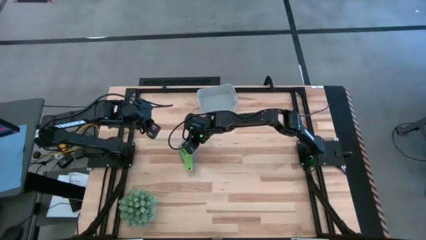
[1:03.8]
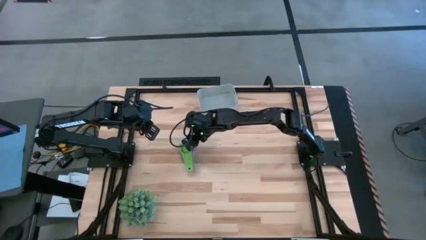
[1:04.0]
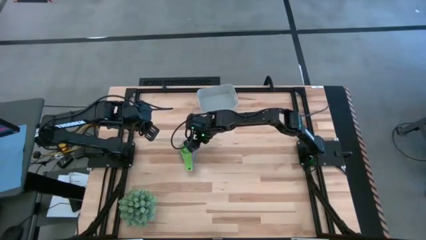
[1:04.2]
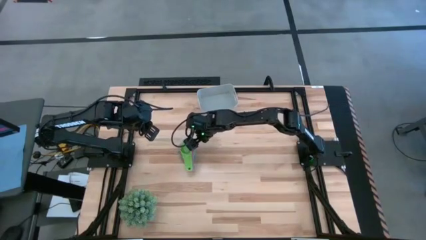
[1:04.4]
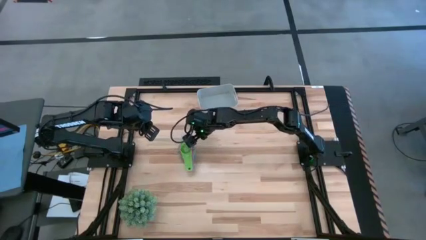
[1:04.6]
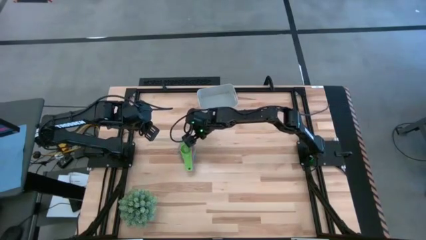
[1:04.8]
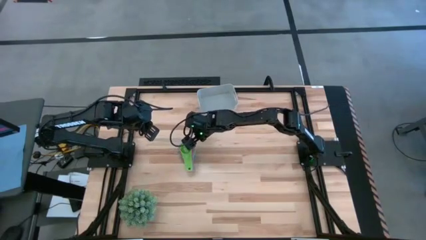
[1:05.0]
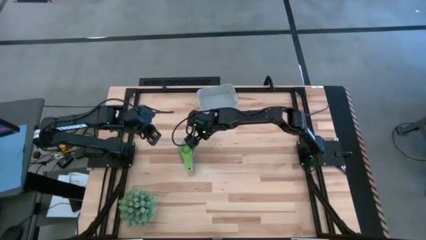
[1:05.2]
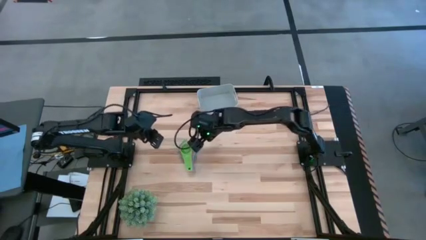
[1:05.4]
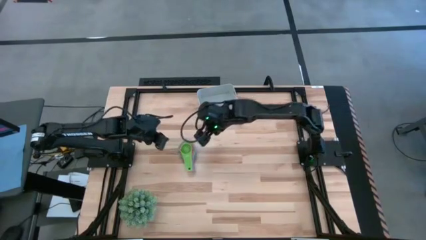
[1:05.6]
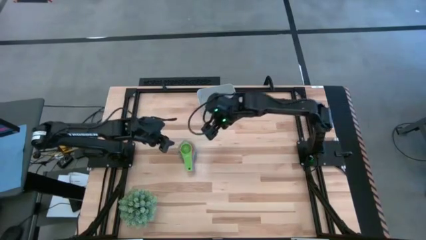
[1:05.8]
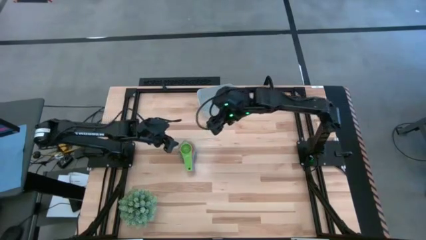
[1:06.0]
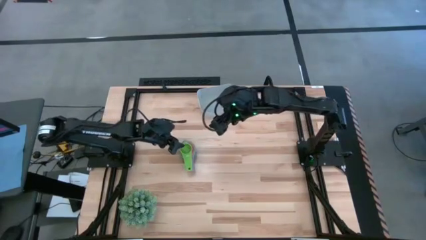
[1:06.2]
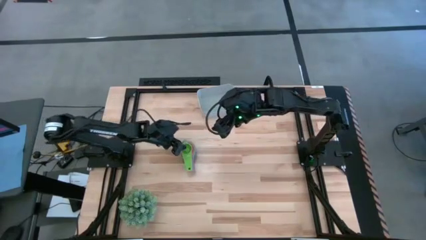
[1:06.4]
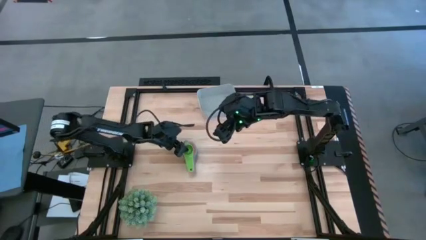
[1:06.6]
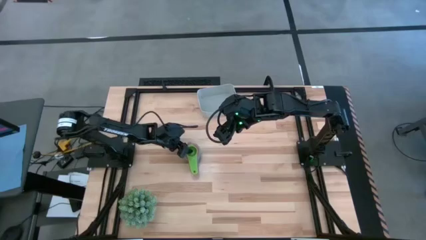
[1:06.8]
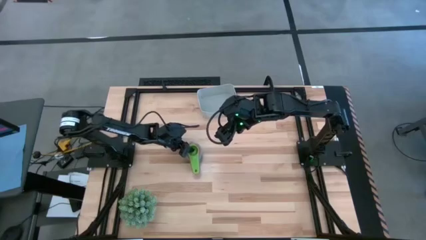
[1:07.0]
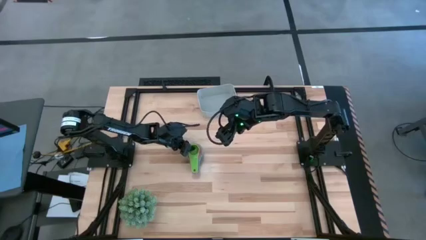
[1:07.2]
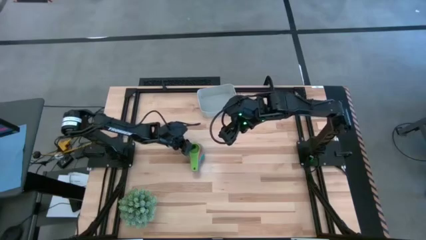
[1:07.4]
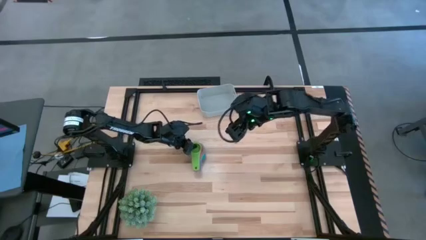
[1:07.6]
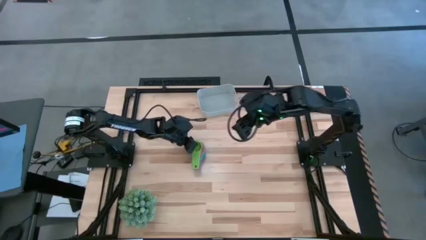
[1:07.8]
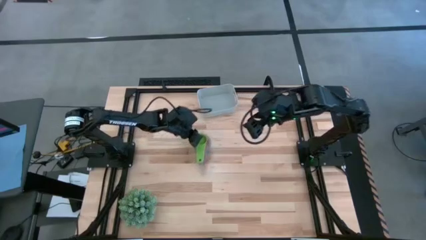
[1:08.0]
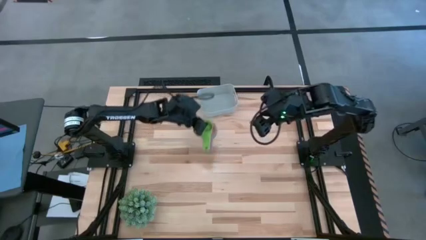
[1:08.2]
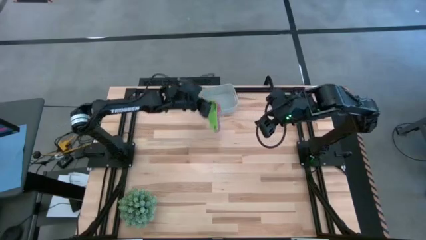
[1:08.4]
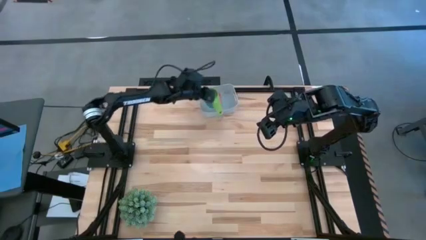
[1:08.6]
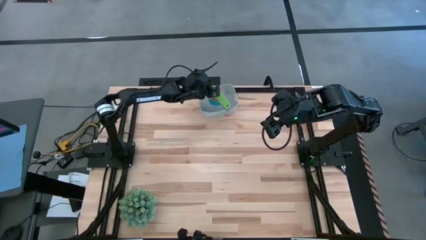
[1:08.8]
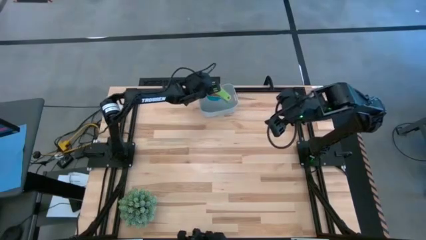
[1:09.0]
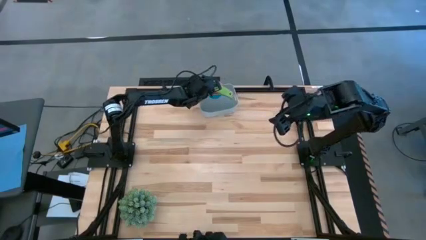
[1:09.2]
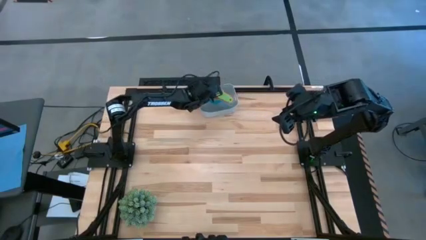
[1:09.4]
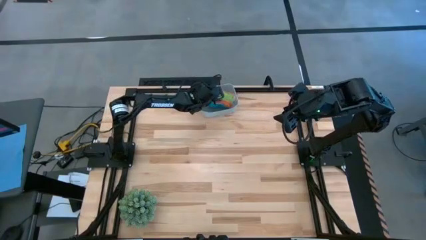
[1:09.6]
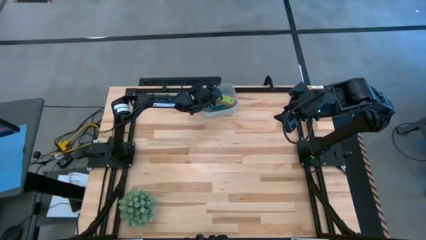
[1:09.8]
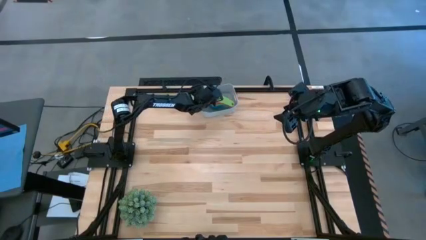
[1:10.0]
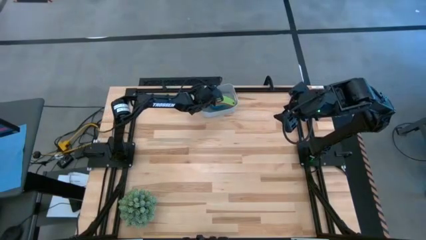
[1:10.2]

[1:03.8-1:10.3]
Task: Nest measuring cups in basket
Put the stacked measuring cups in the gray bin

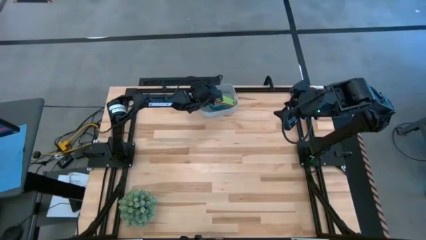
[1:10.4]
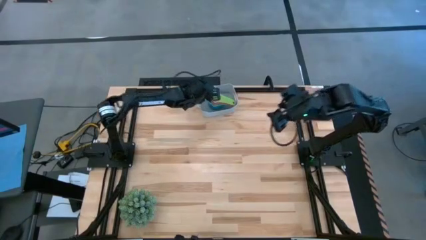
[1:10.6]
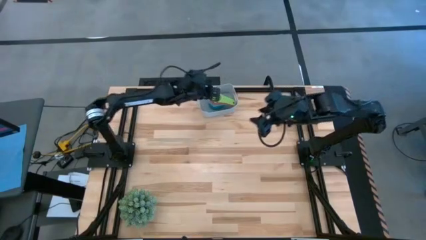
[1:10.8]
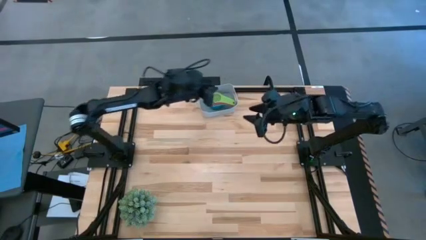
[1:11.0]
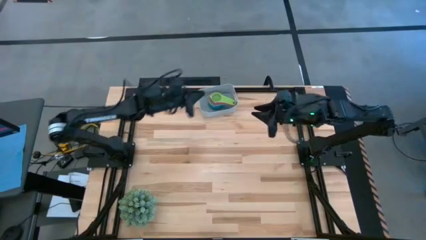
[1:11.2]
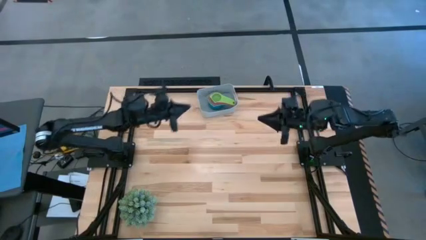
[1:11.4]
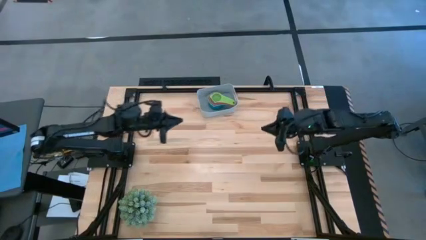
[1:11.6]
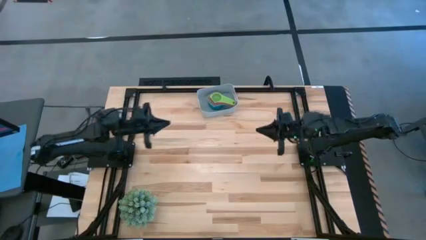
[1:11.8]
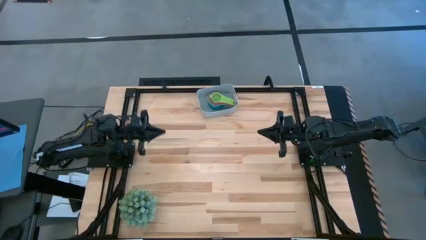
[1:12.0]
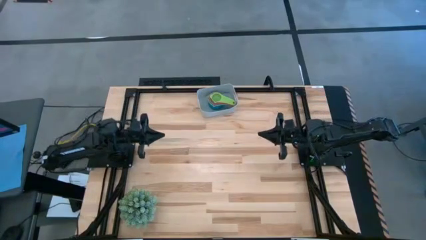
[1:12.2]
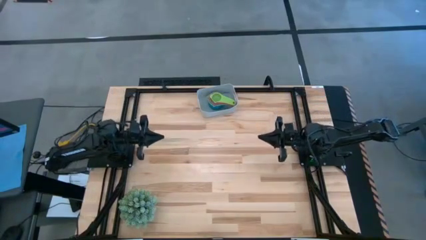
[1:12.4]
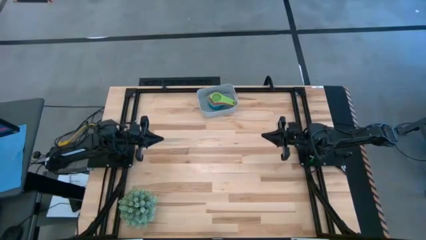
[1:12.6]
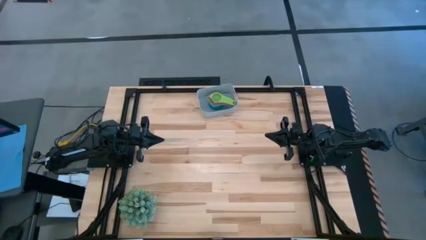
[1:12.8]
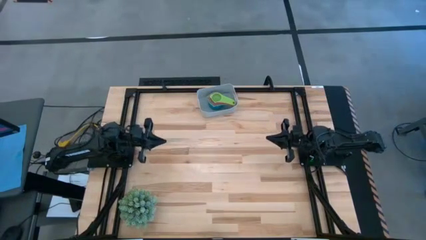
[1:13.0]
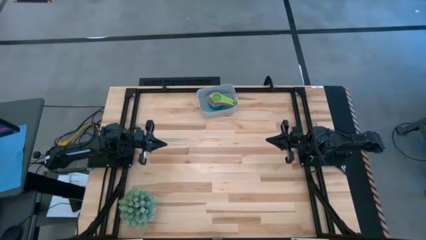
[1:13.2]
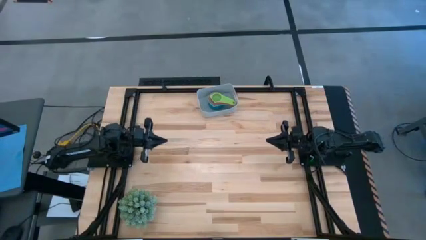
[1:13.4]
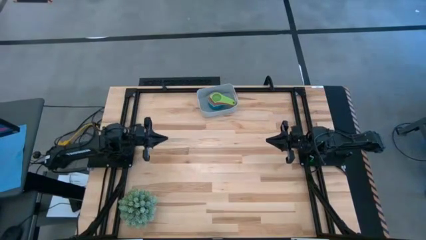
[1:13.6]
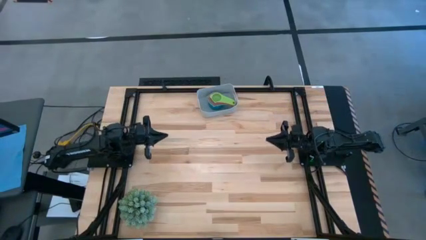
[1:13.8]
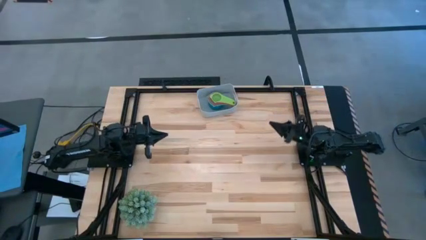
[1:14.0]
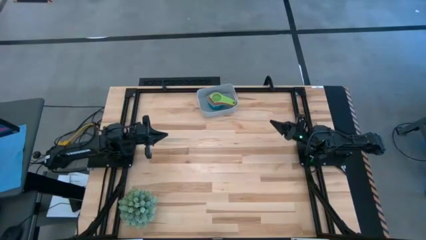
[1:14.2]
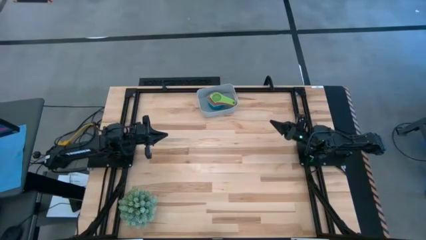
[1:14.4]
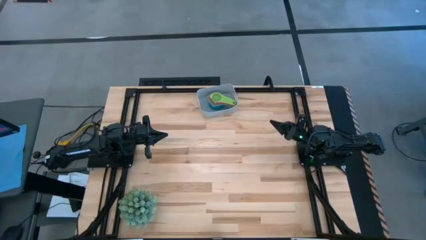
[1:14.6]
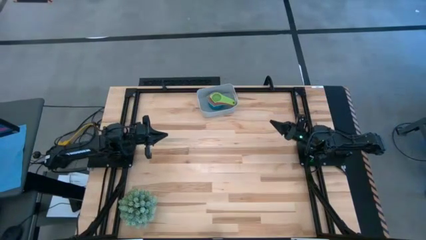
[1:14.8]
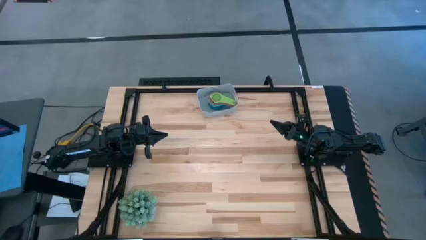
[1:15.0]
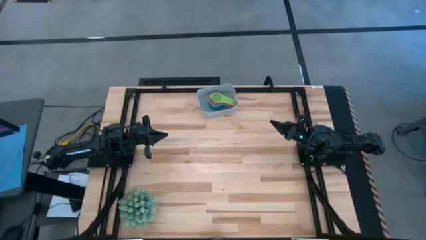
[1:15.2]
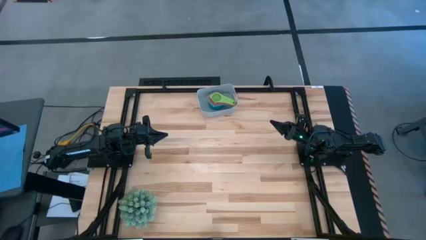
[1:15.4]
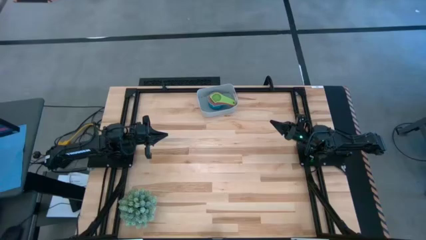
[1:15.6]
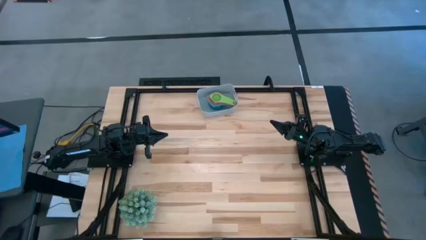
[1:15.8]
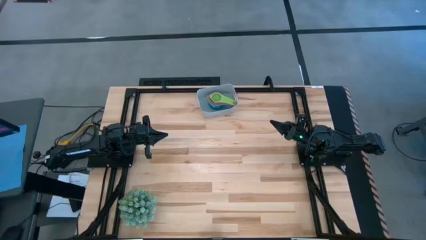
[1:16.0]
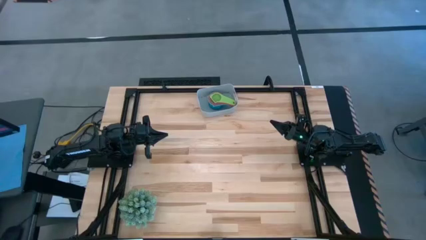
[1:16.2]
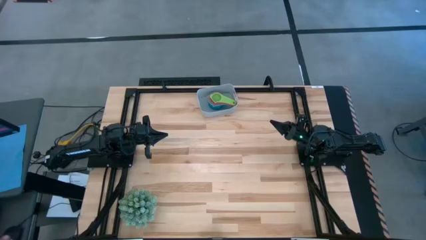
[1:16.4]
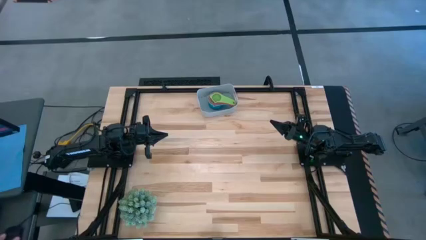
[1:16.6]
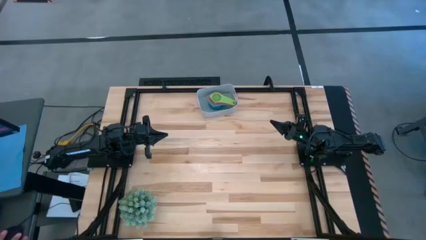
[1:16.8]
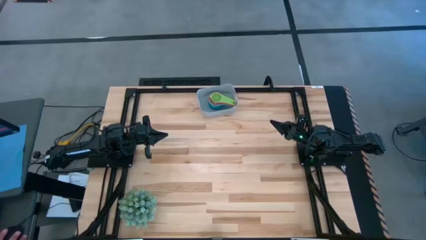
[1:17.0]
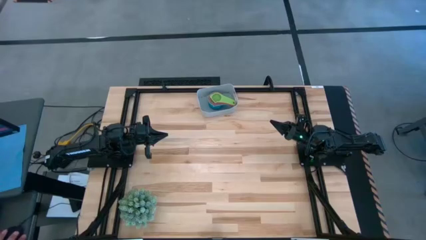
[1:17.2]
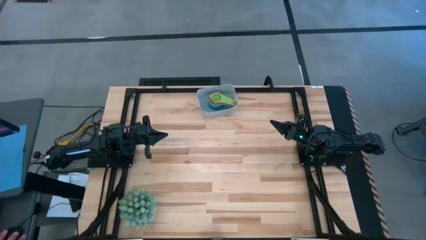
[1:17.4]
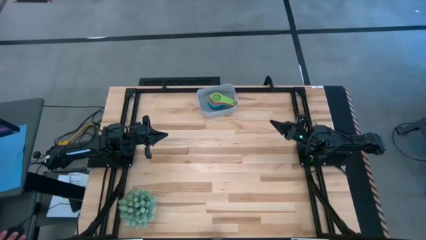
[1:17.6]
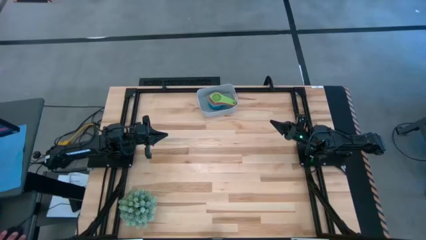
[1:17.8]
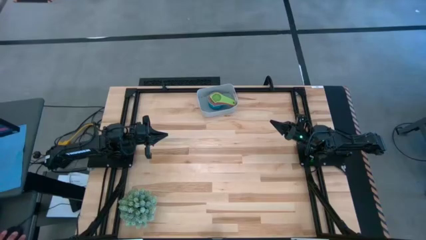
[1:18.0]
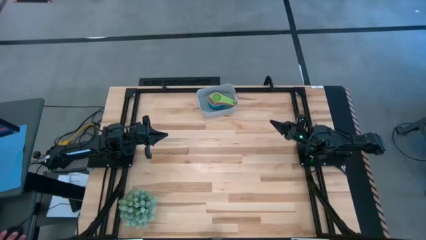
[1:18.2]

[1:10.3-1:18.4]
Return to Home Position

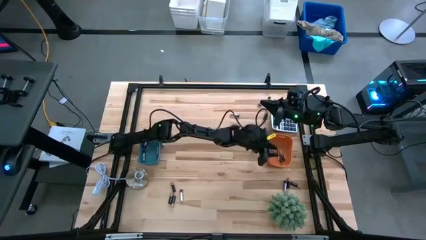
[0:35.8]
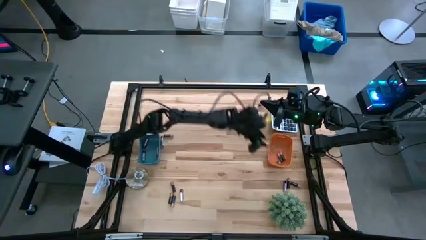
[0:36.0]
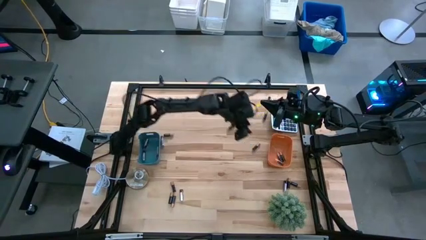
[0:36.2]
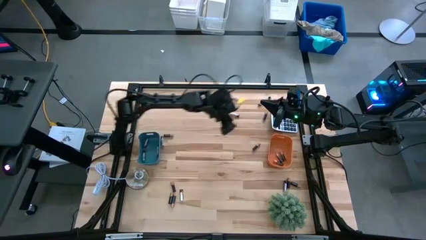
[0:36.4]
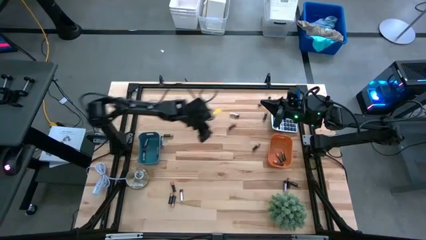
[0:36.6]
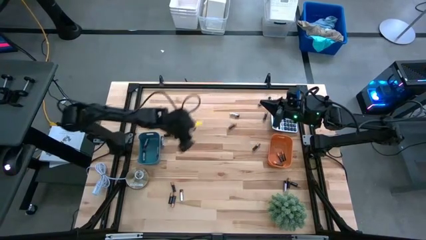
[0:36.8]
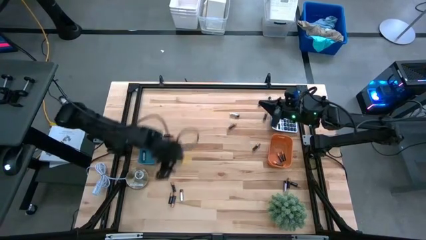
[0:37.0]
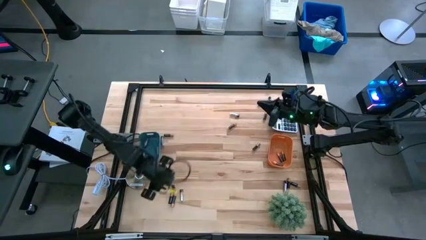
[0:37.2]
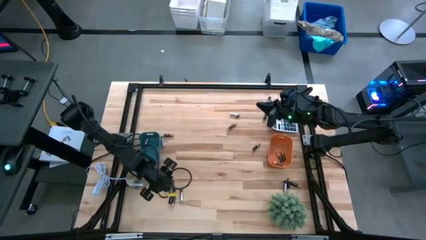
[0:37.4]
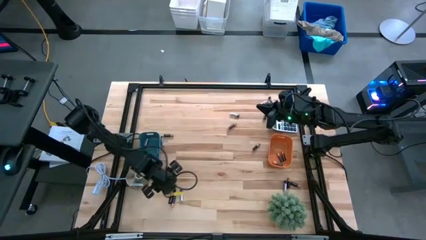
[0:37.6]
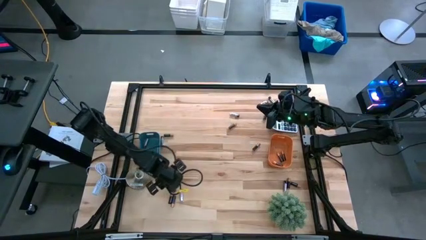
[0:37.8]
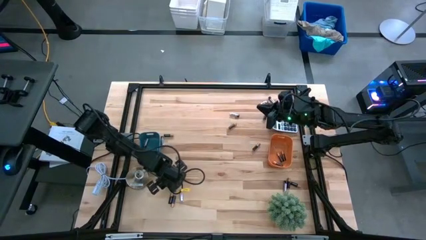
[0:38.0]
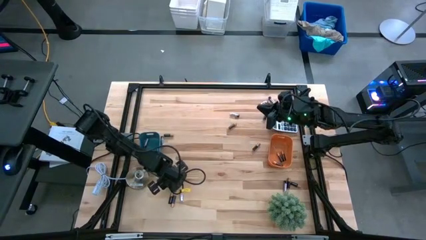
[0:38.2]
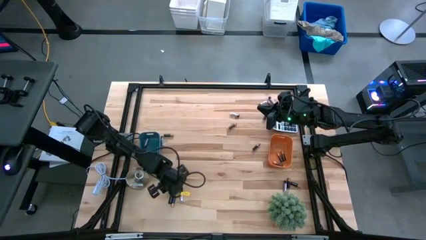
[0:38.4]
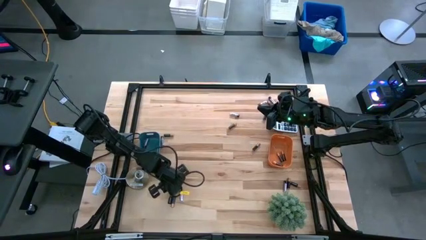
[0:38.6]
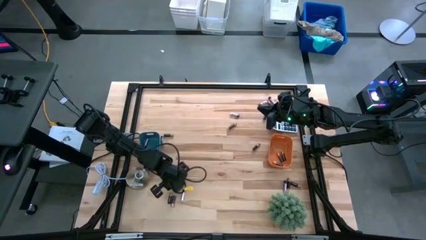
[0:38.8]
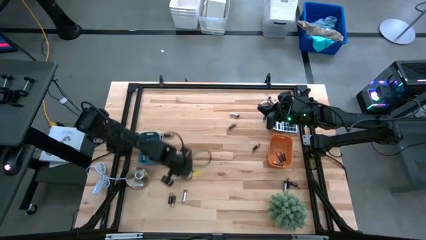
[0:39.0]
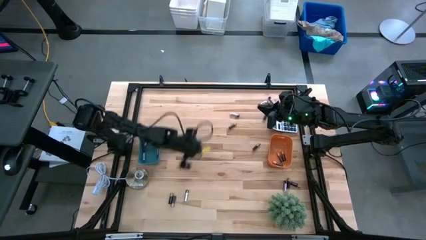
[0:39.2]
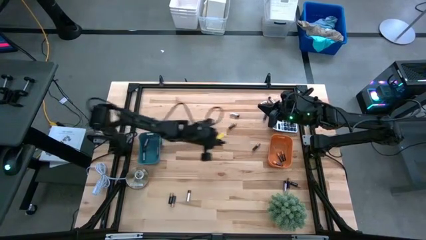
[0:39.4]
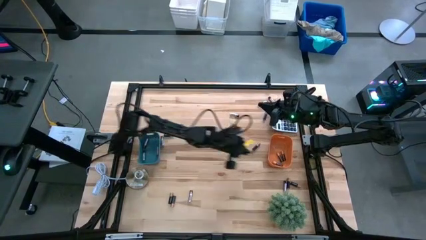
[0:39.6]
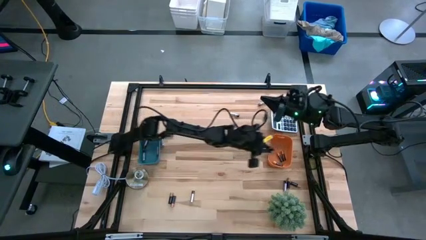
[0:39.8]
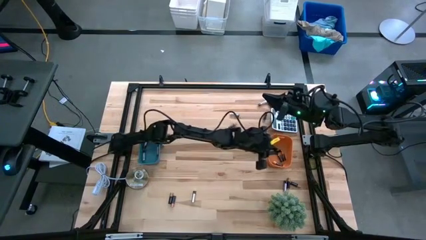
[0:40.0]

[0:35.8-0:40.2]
Task: Sort batteries
Put the black battery into the orange bin
